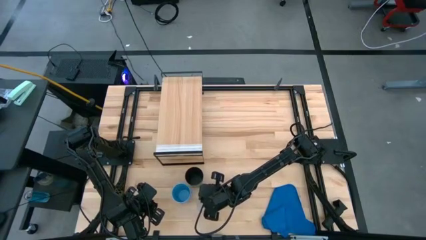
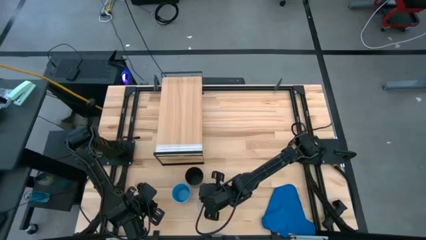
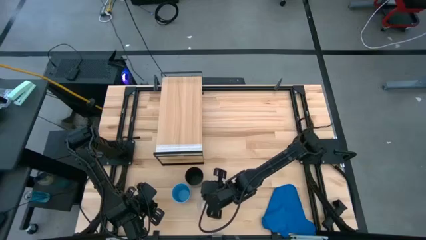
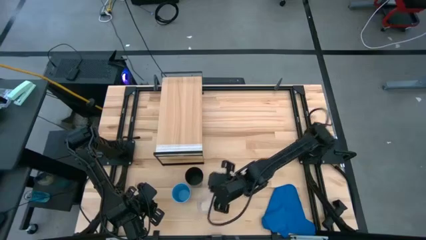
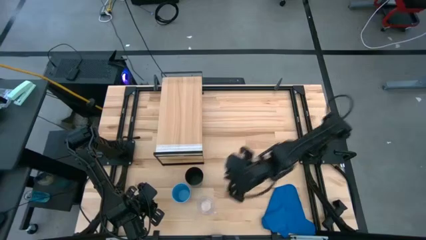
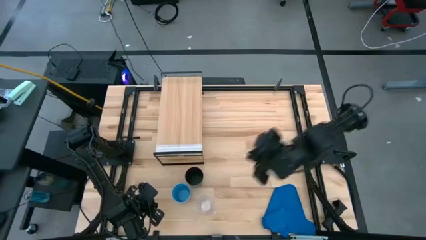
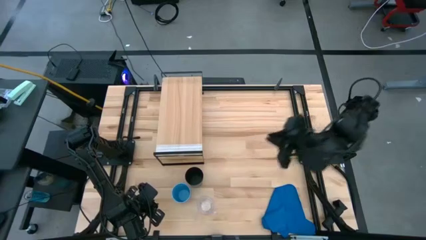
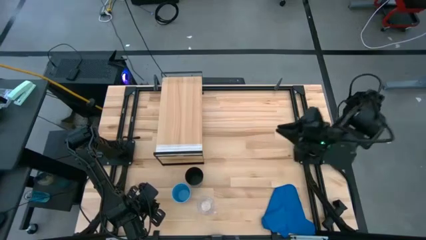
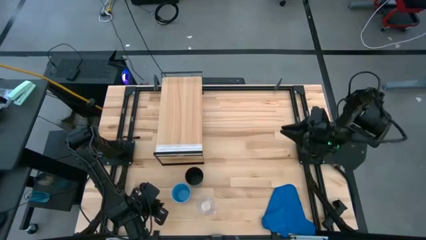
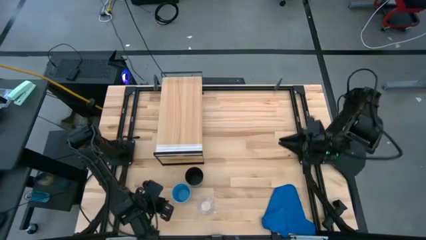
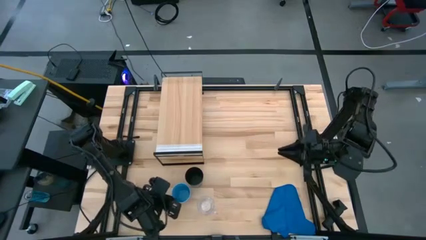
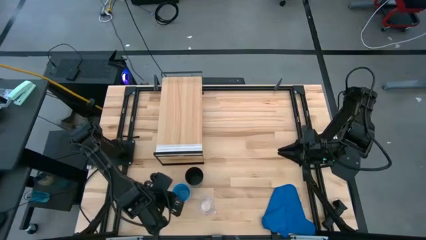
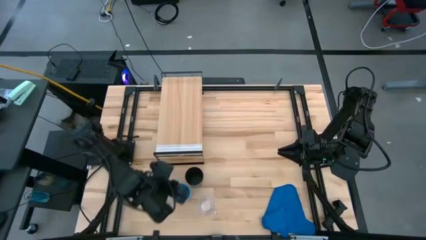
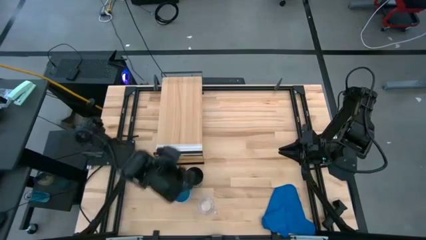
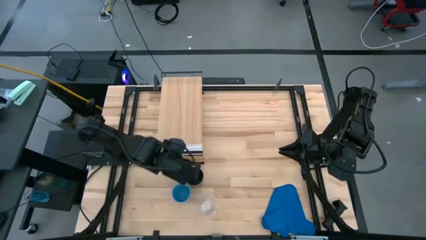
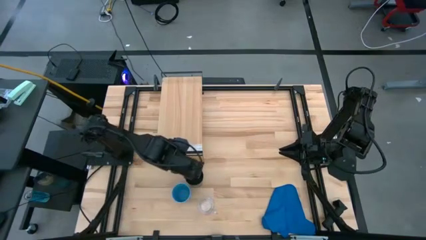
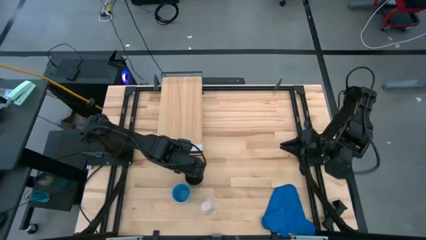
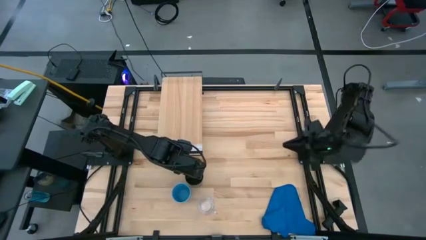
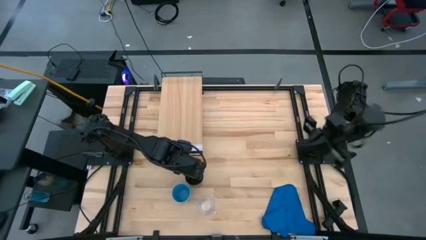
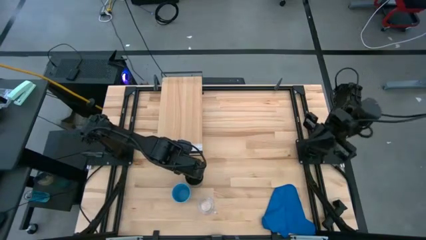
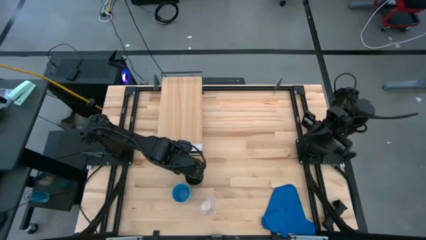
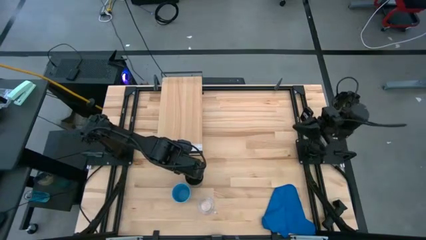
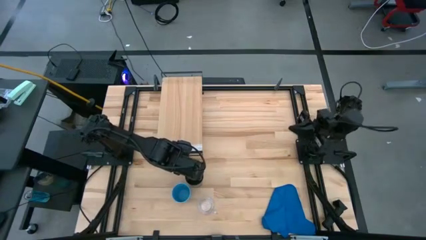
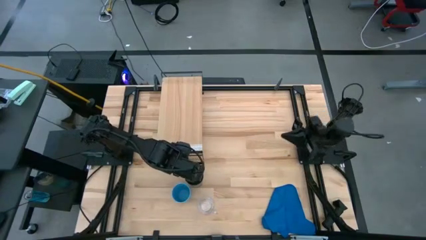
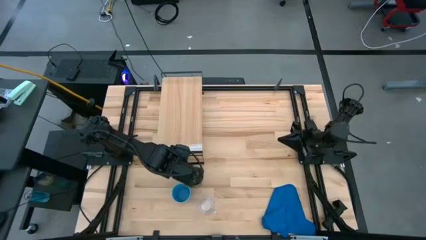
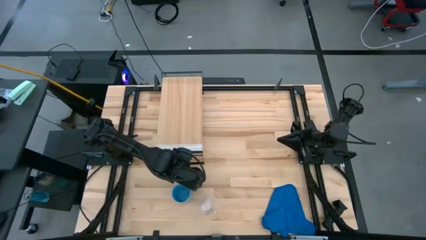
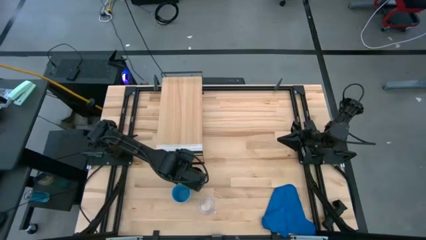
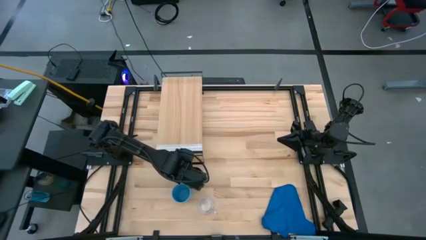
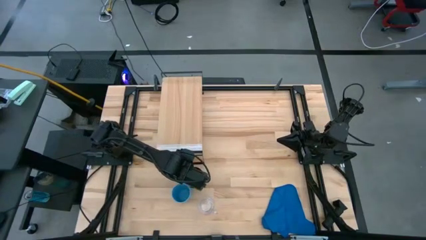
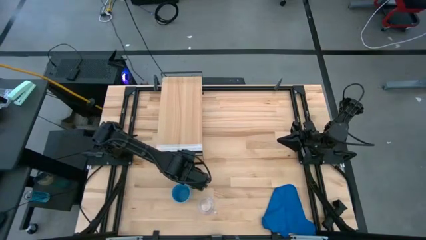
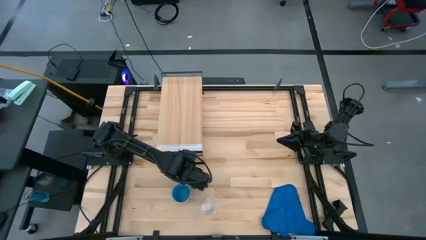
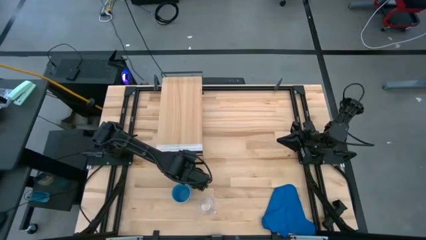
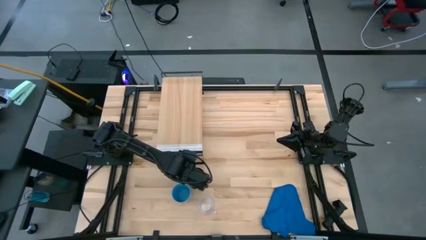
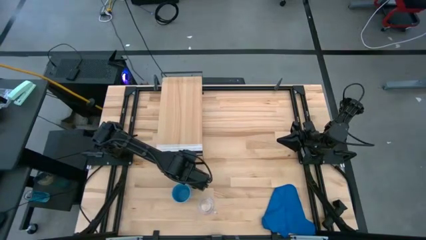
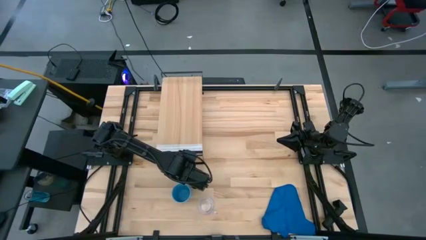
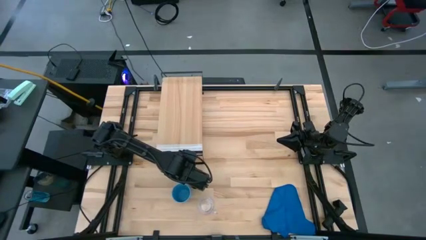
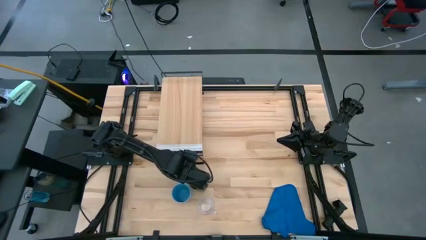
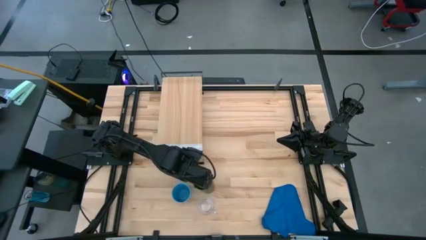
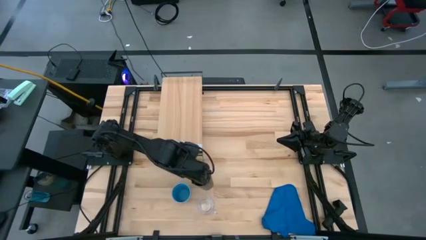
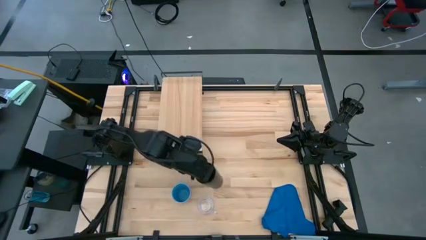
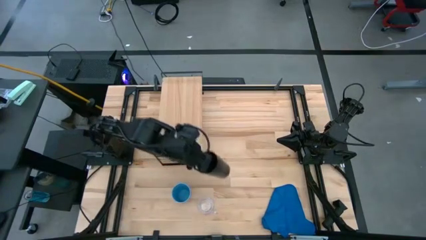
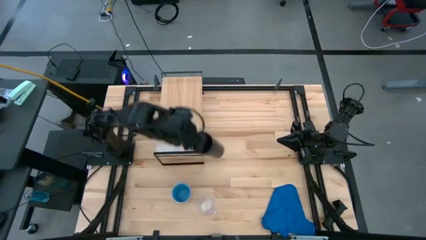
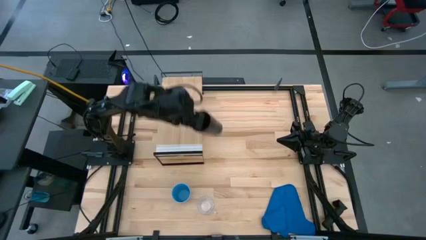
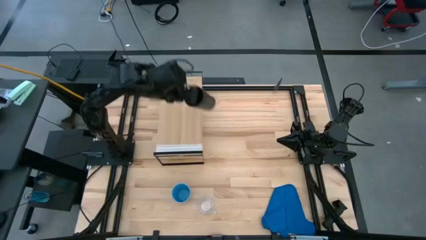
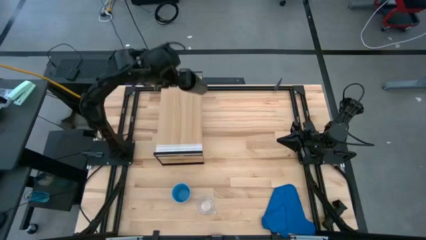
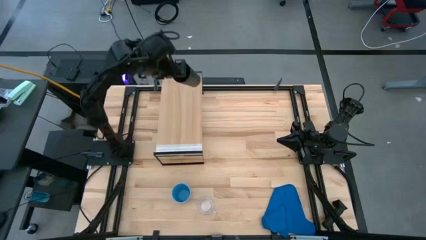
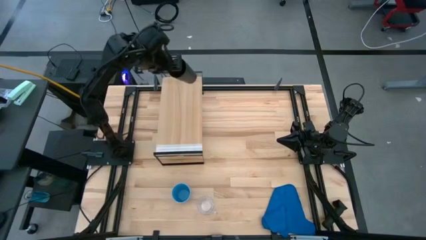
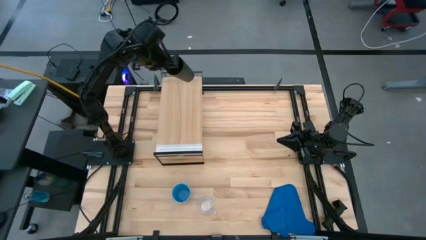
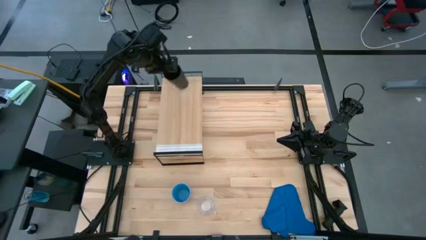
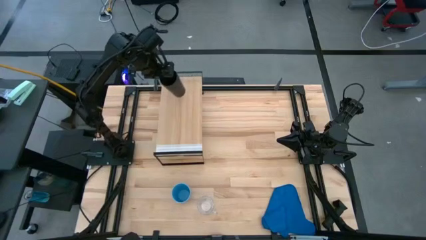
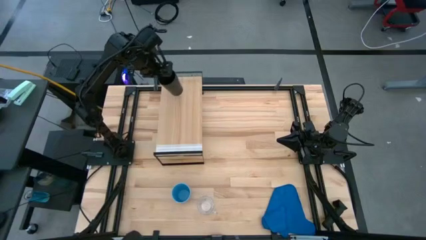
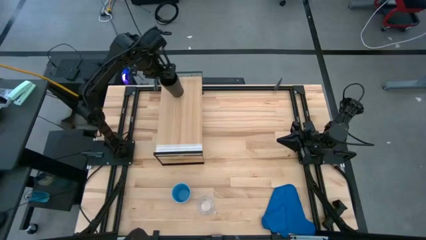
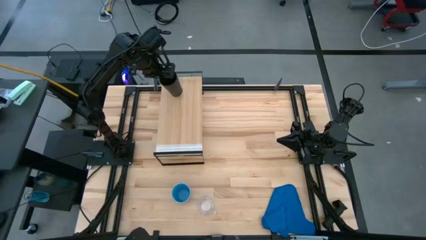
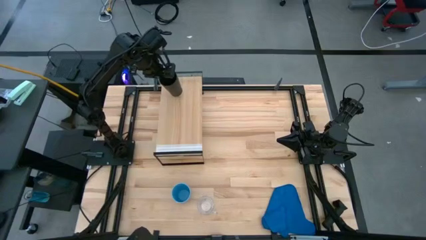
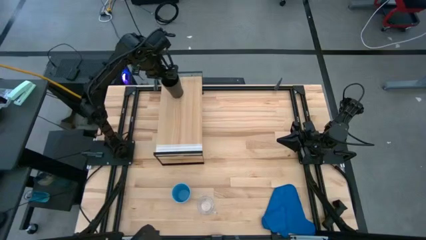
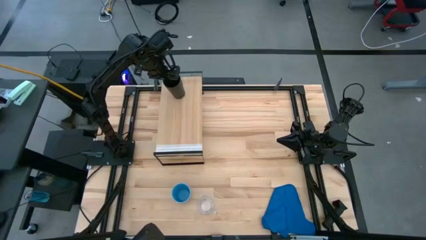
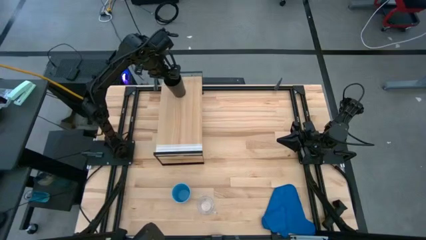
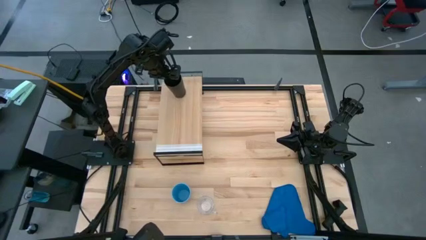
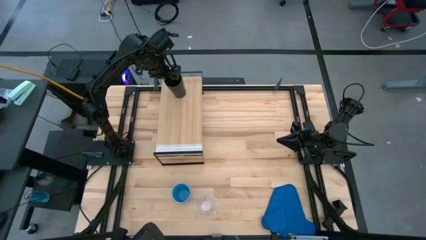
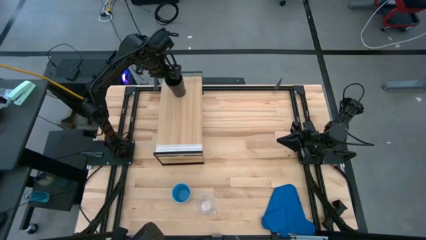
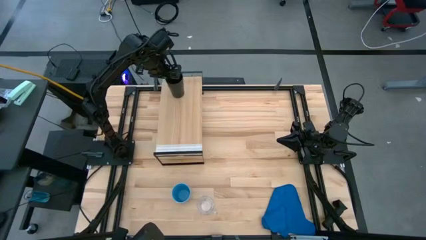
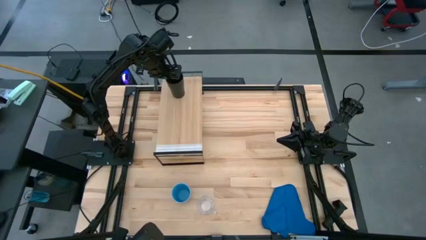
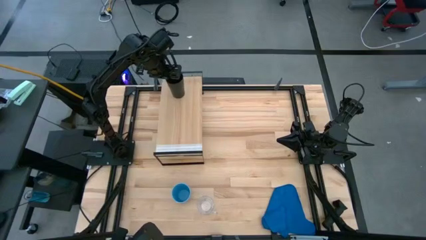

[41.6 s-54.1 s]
Task: Stack small to large cups/mugs on shelf
Put the black cup on the shelf
